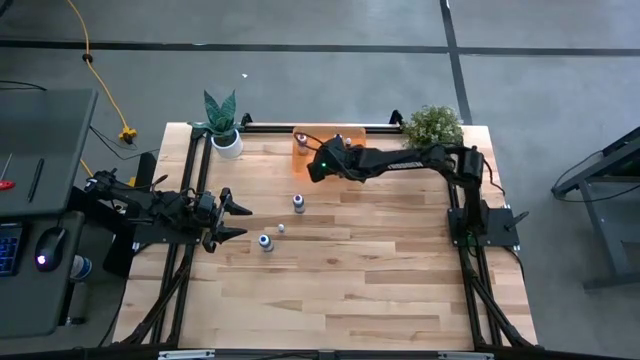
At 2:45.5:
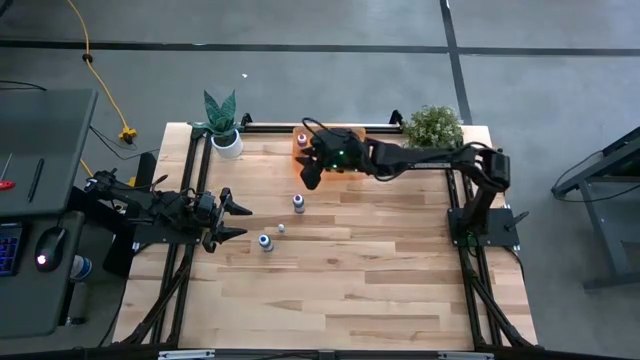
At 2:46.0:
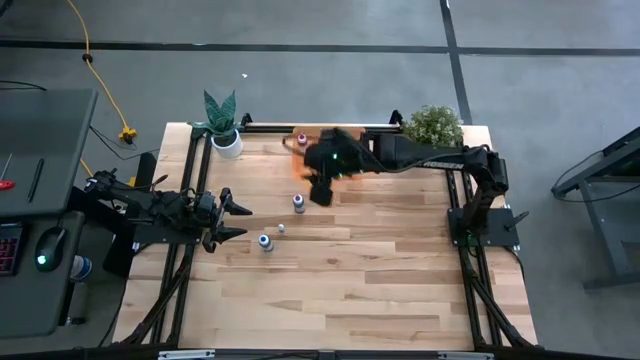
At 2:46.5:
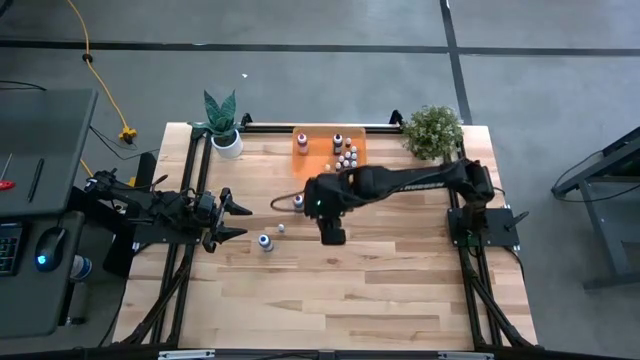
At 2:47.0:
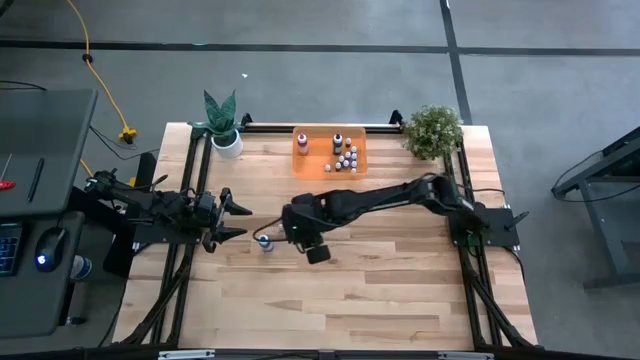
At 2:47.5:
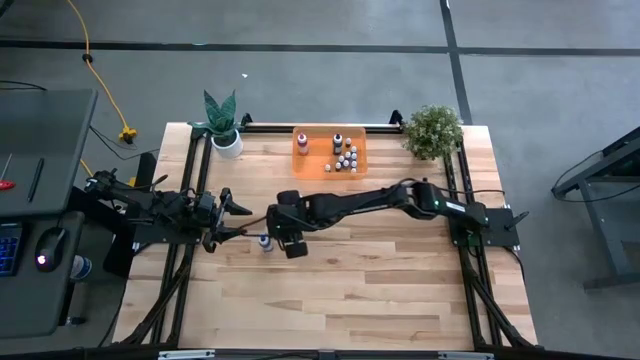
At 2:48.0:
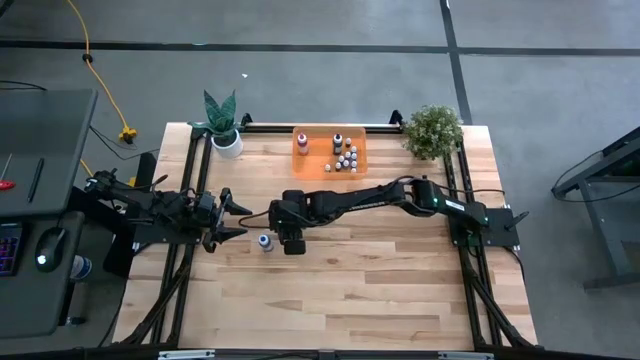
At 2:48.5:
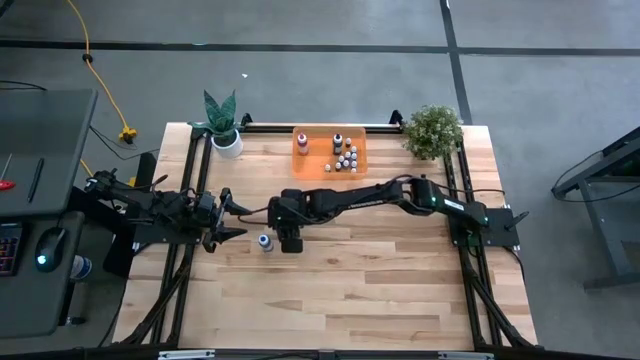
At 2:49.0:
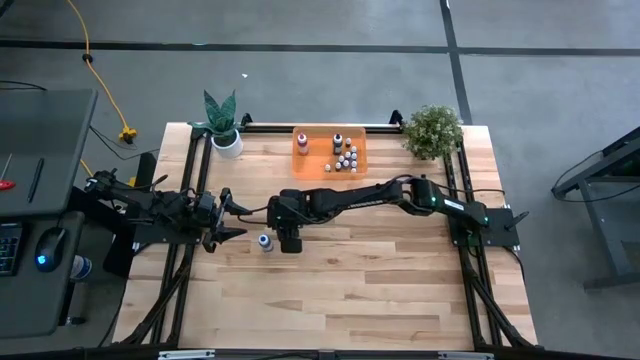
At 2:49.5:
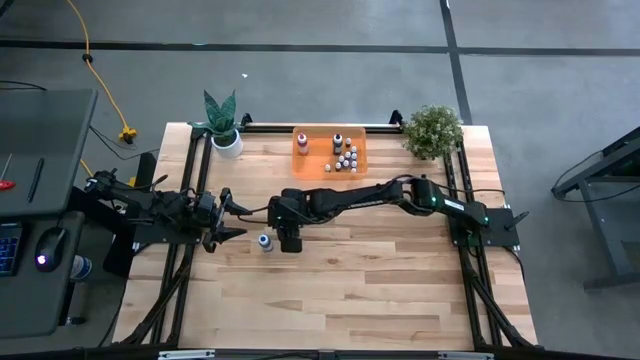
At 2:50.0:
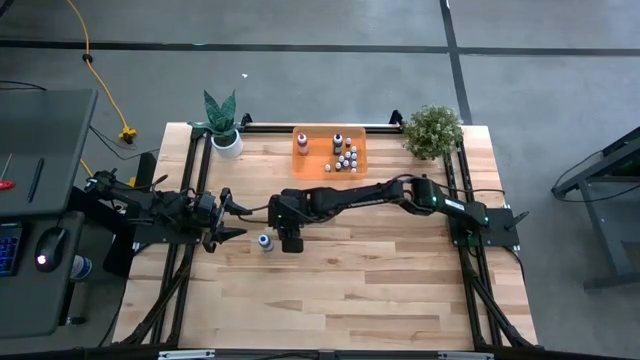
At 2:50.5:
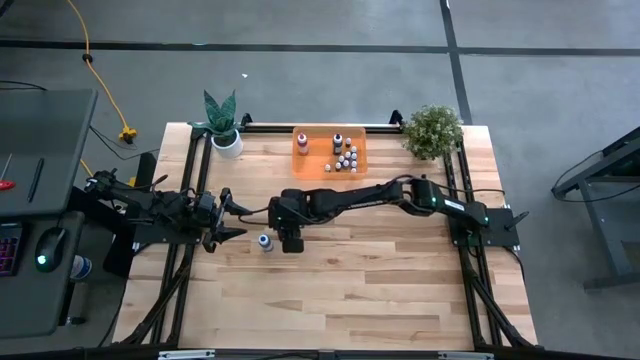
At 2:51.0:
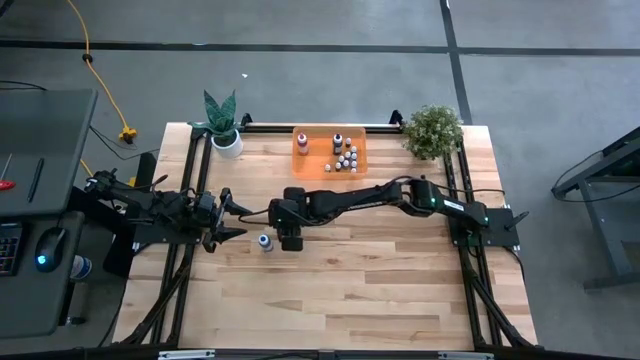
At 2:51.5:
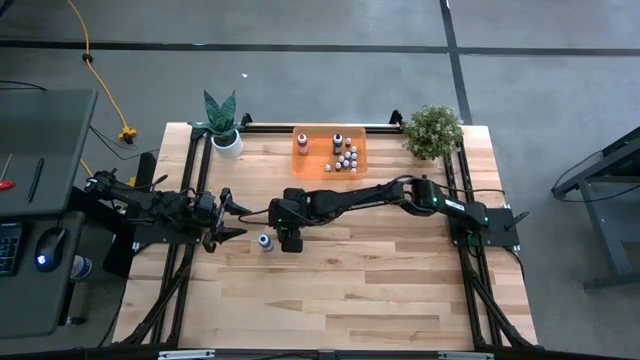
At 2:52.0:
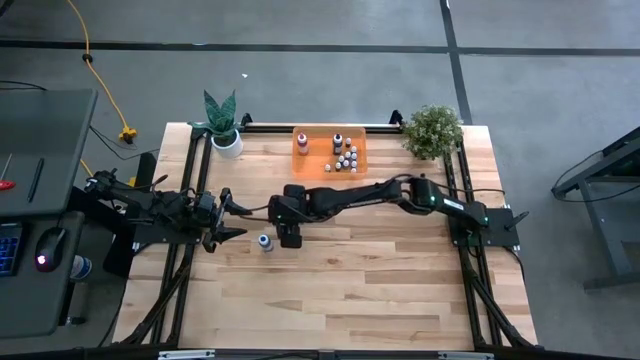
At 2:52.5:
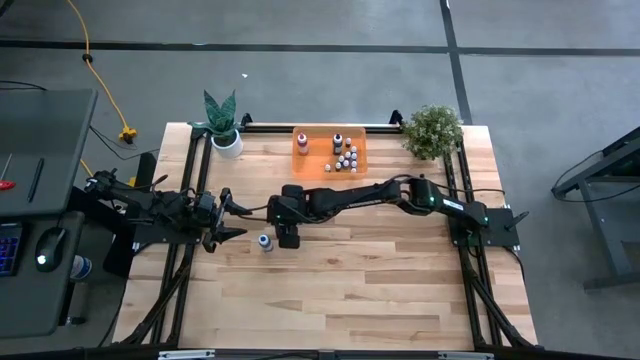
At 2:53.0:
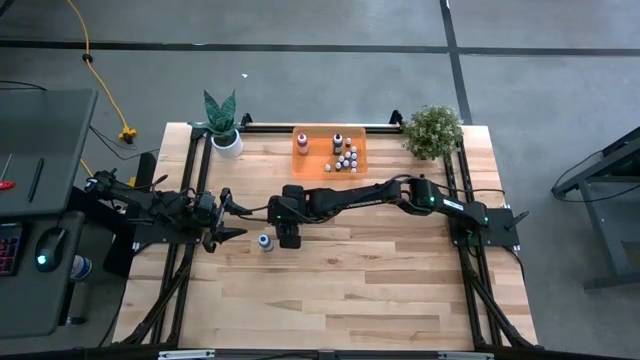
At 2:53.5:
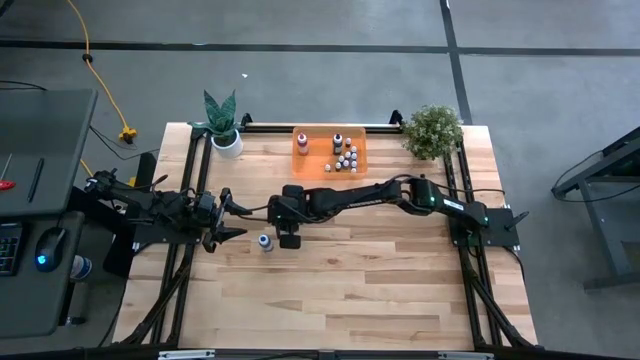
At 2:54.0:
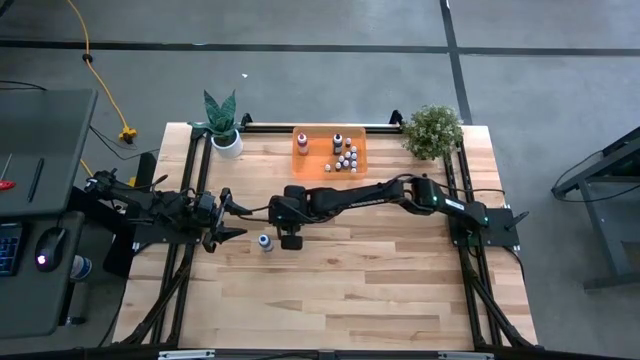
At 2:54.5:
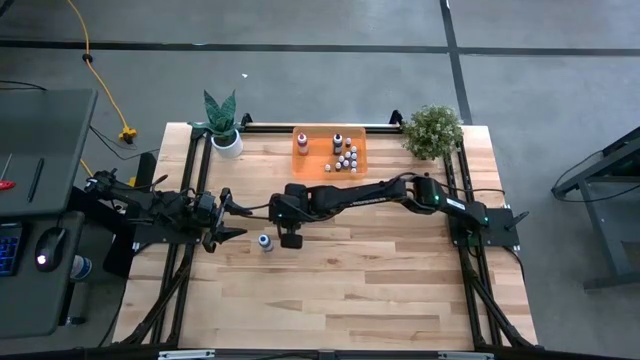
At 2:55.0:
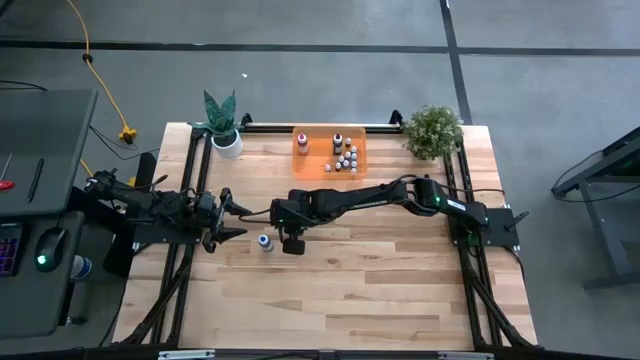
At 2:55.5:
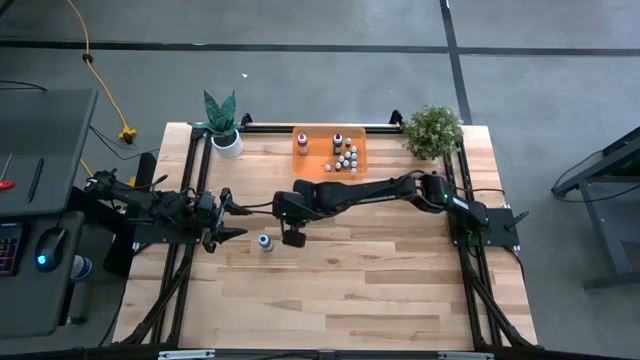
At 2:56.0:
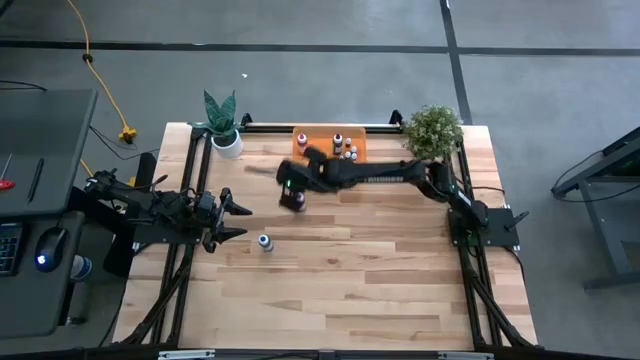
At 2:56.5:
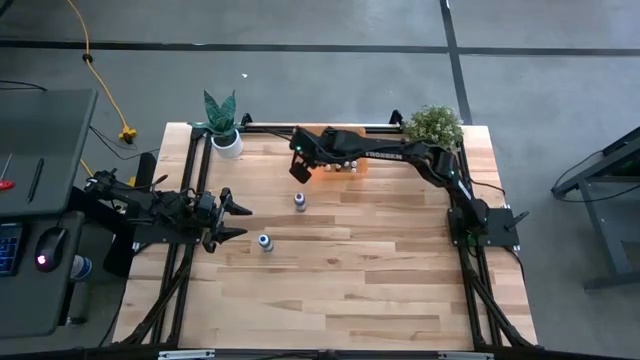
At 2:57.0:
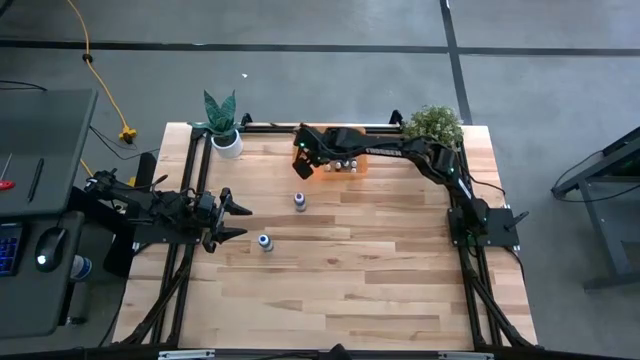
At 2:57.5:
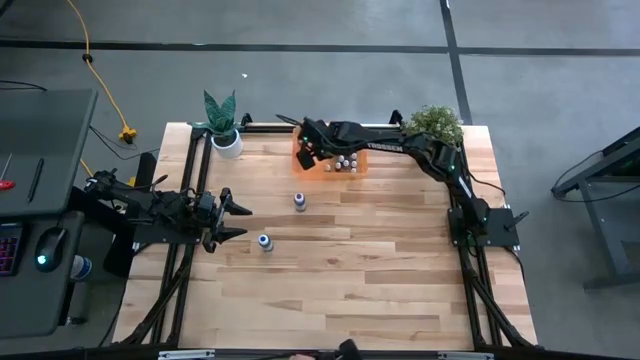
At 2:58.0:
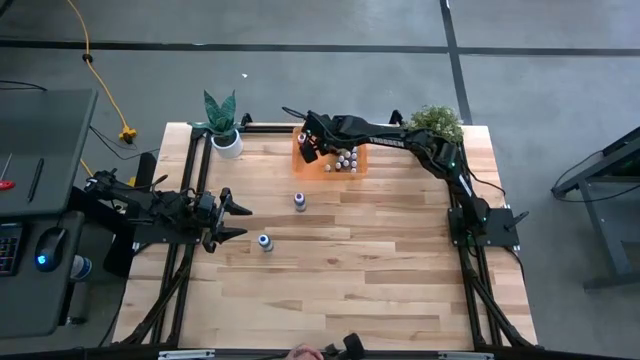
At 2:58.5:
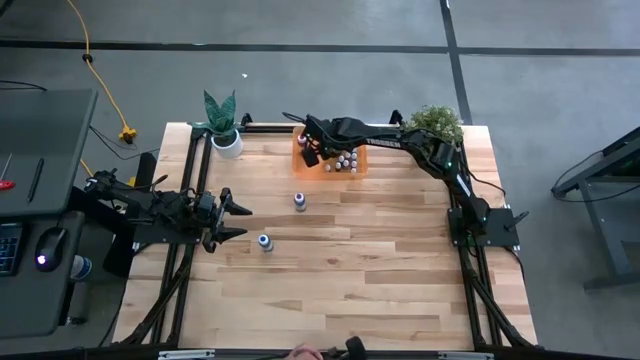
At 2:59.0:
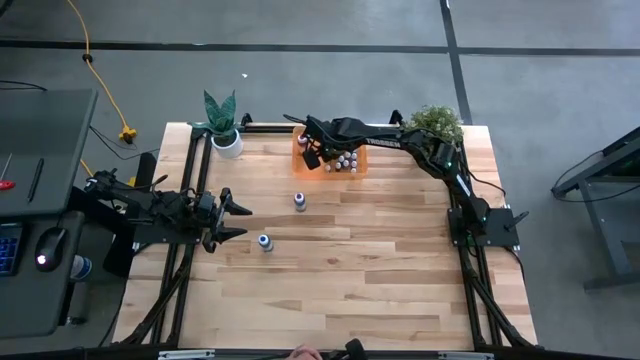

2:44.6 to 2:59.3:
Task: Pick & Place food coloring
Put the small blue food coloring bottle into the orange bin

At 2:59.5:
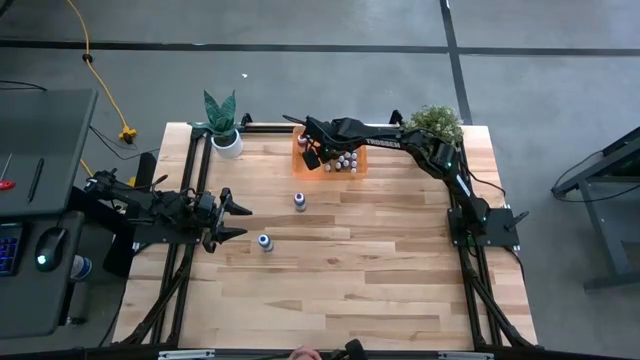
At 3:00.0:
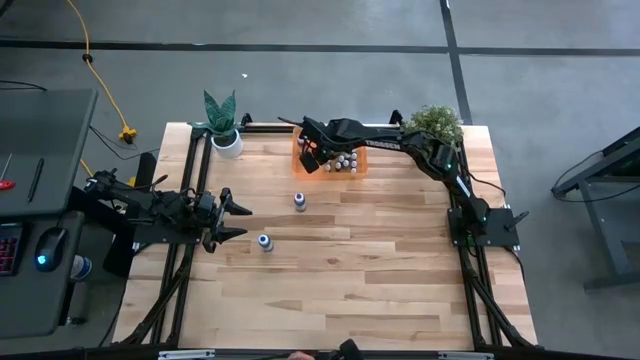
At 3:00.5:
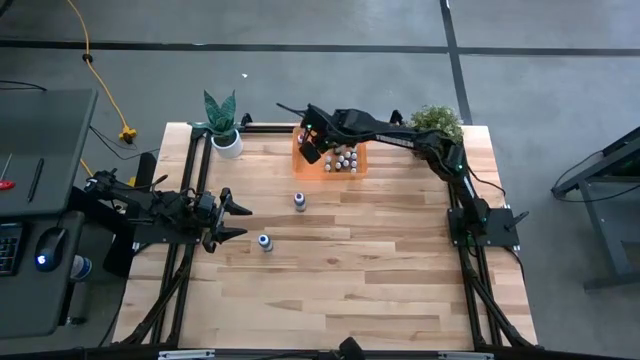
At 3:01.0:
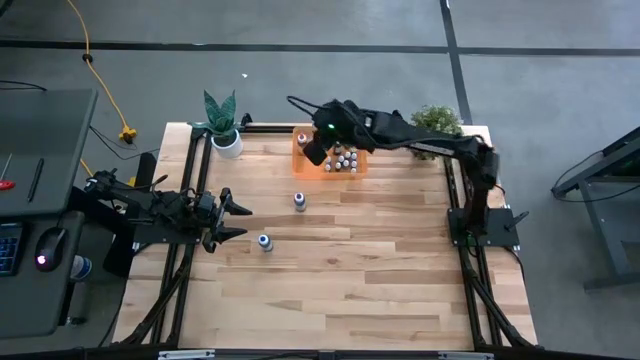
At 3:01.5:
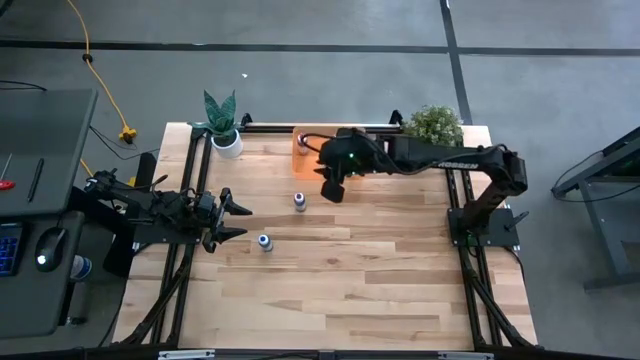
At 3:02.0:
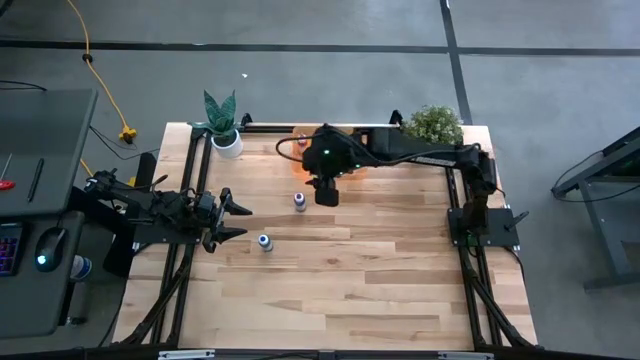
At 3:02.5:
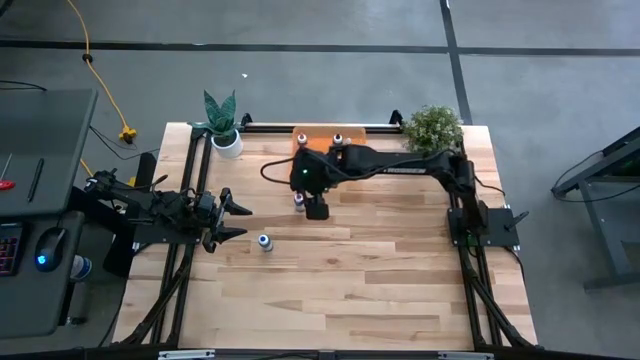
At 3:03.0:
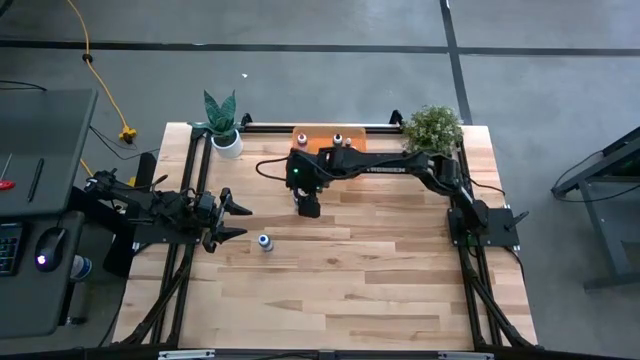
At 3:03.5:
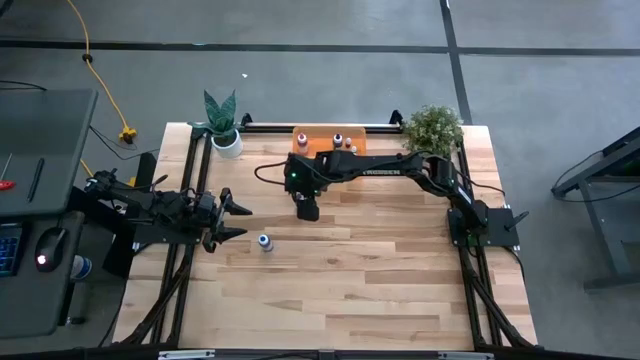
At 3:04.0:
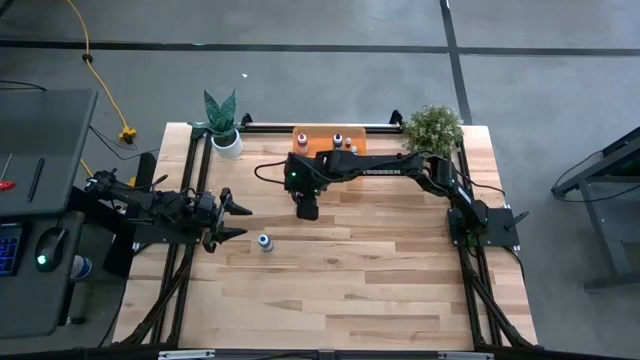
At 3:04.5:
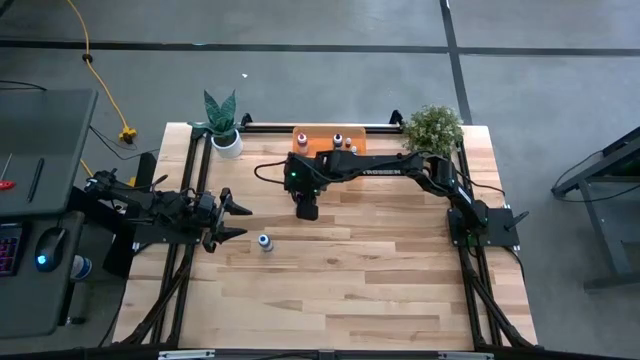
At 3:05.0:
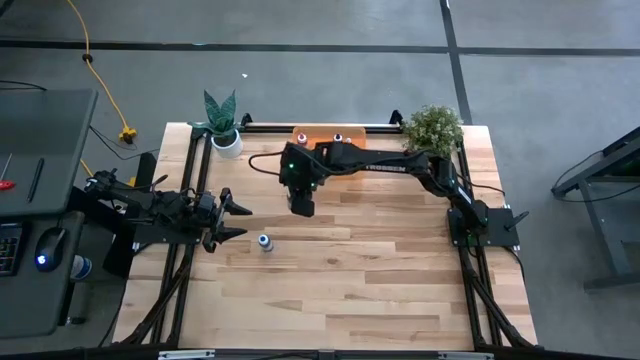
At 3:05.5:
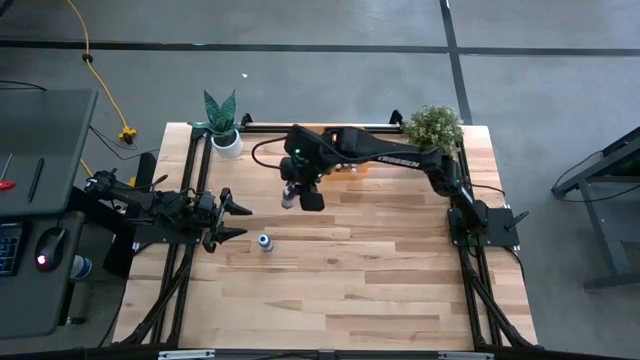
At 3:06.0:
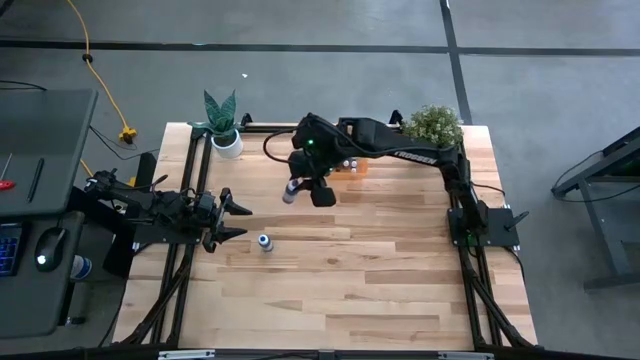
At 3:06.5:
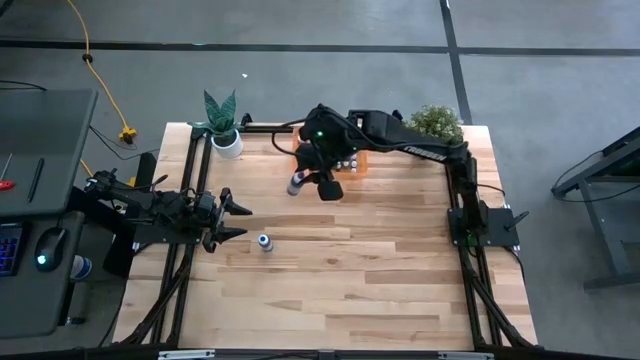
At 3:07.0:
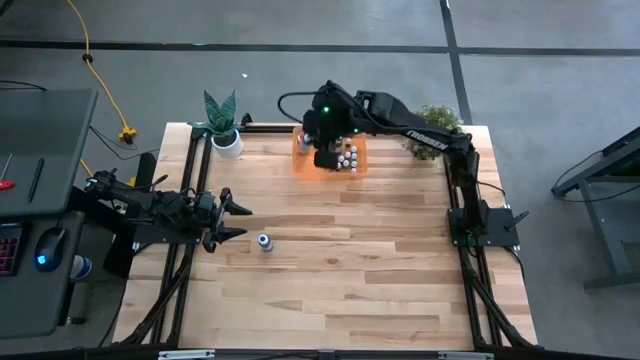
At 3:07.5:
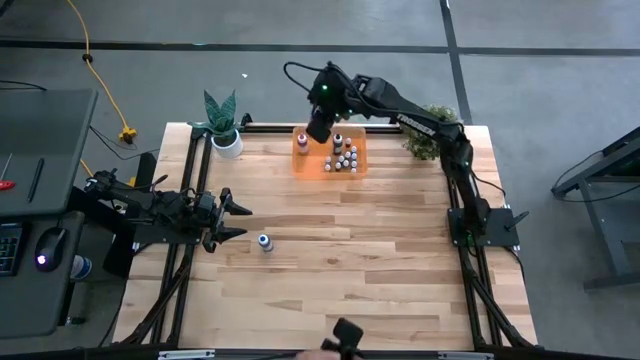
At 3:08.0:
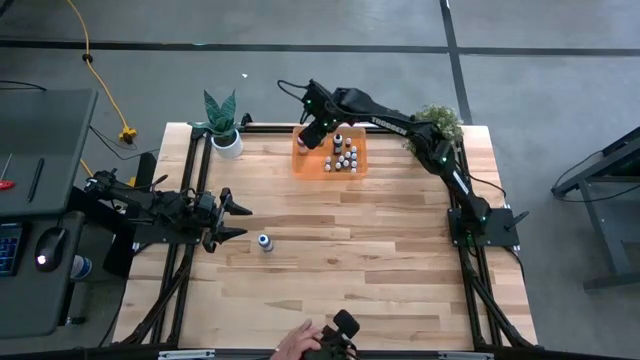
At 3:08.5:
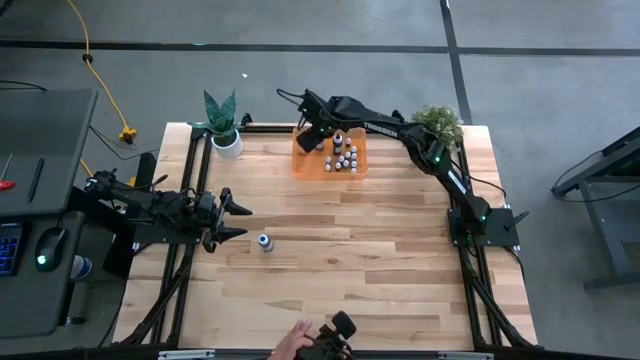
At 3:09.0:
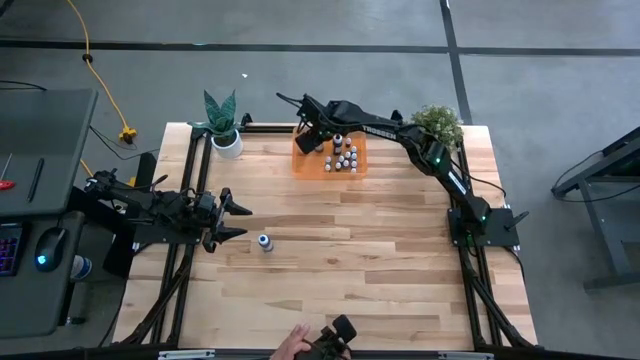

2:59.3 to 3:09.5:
Put the violet food coloring bottle into the orange bin
